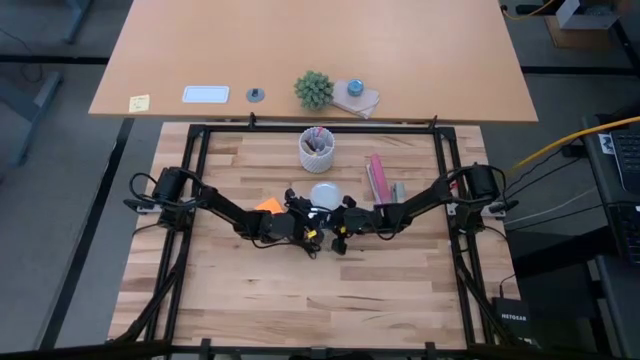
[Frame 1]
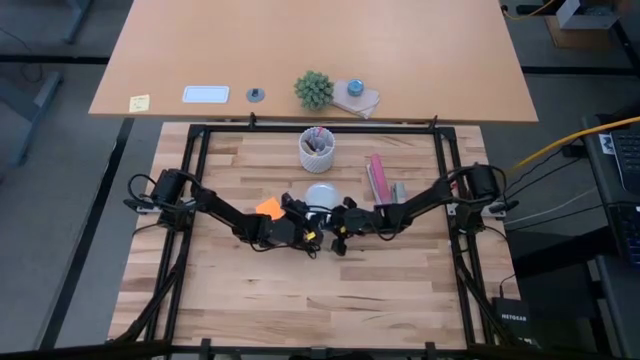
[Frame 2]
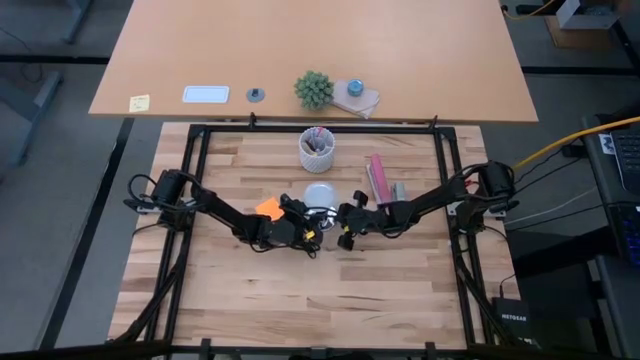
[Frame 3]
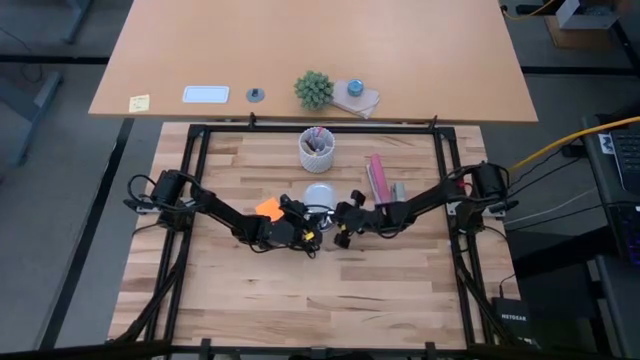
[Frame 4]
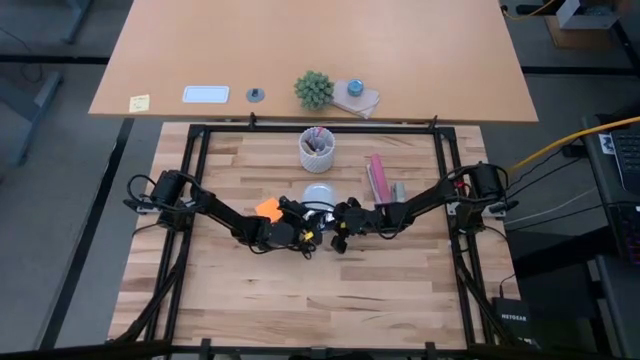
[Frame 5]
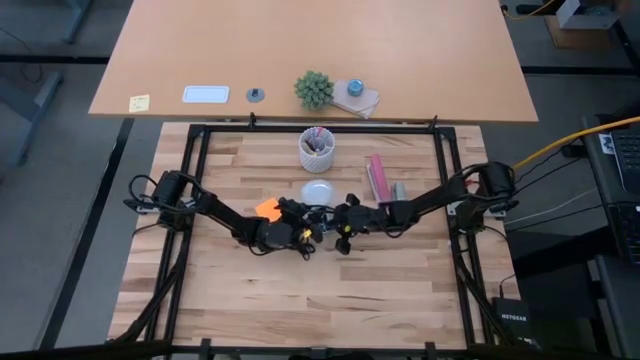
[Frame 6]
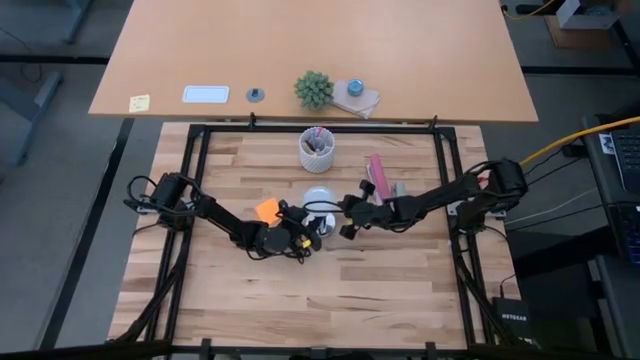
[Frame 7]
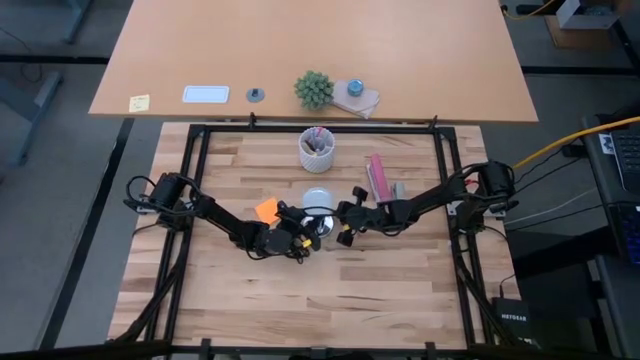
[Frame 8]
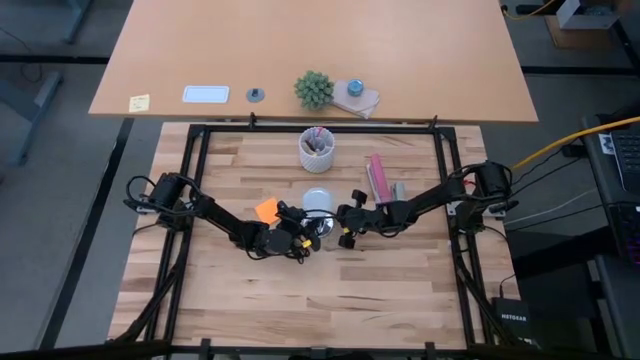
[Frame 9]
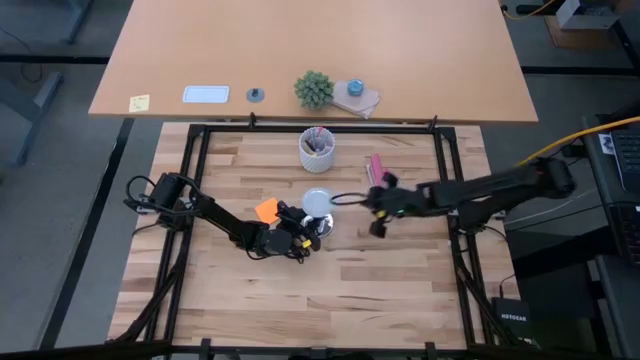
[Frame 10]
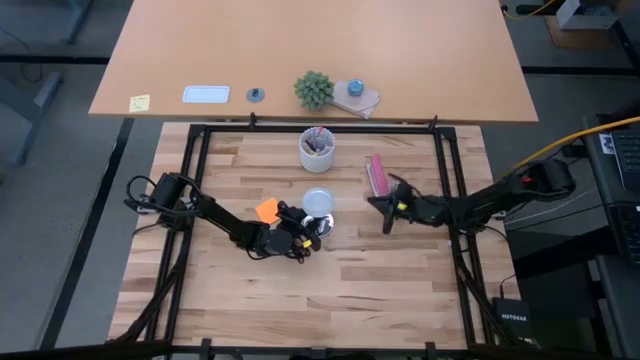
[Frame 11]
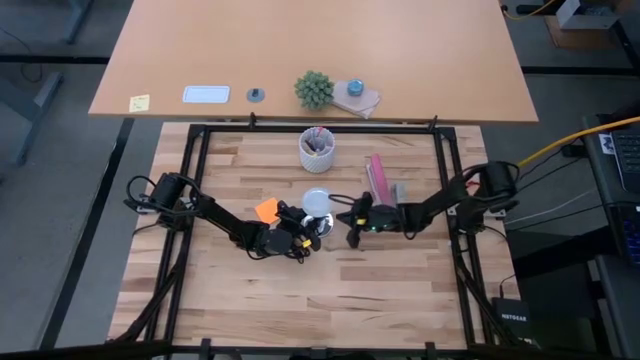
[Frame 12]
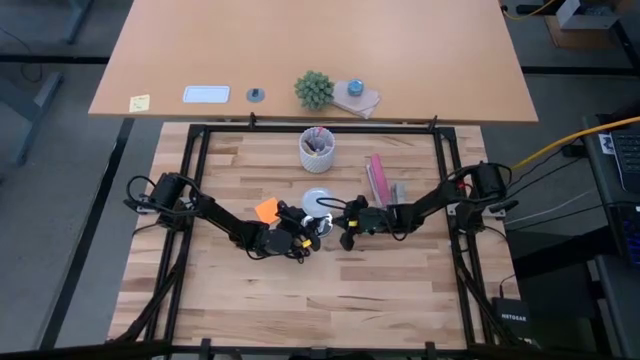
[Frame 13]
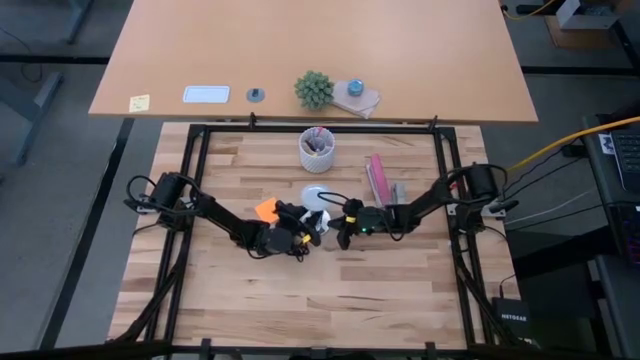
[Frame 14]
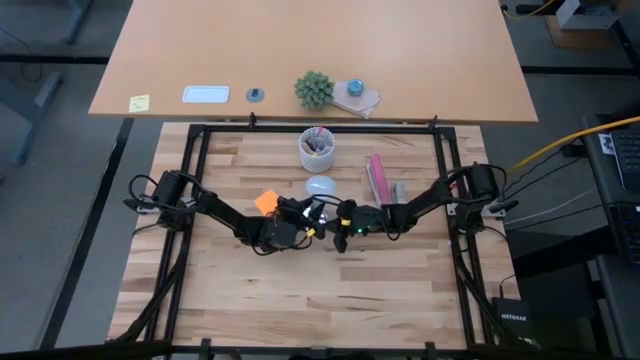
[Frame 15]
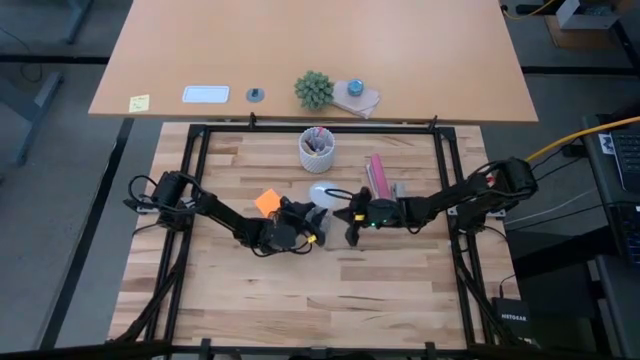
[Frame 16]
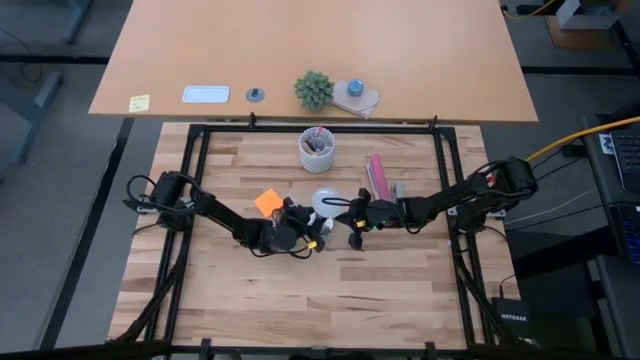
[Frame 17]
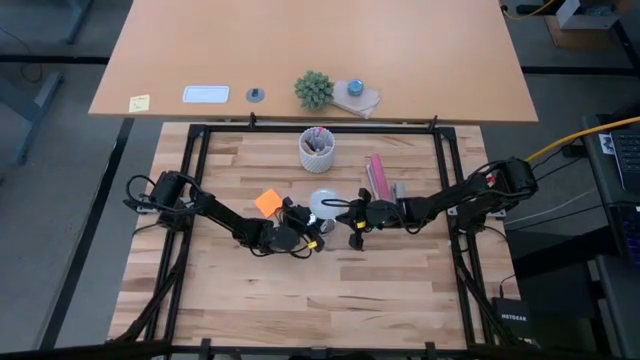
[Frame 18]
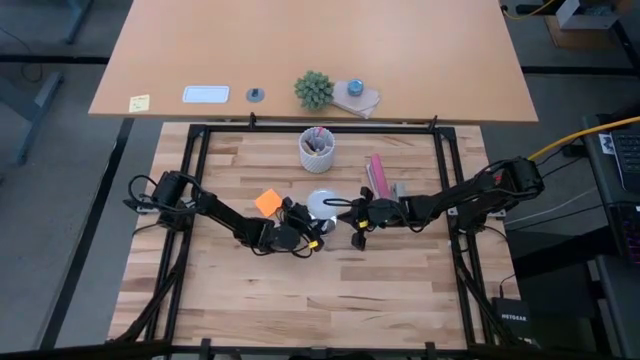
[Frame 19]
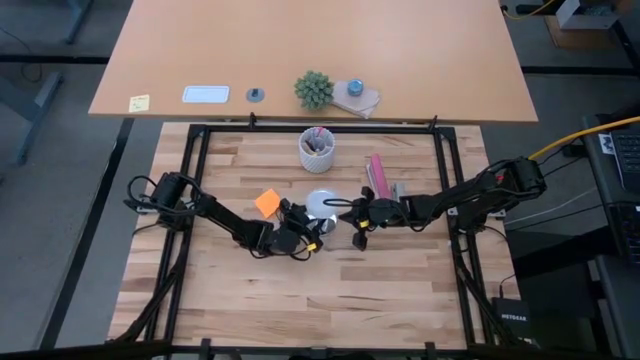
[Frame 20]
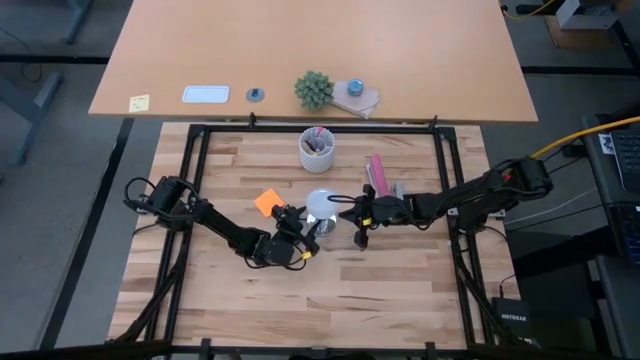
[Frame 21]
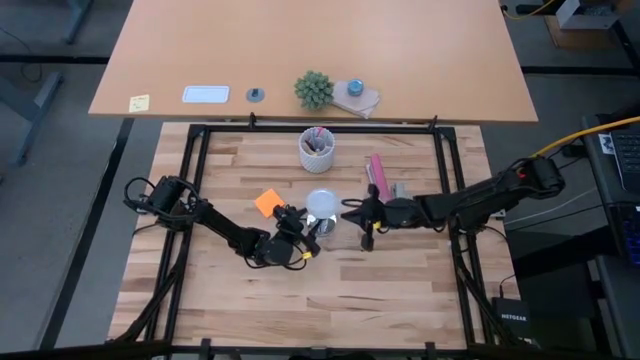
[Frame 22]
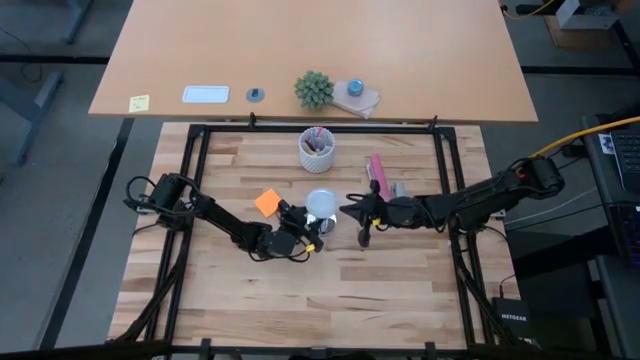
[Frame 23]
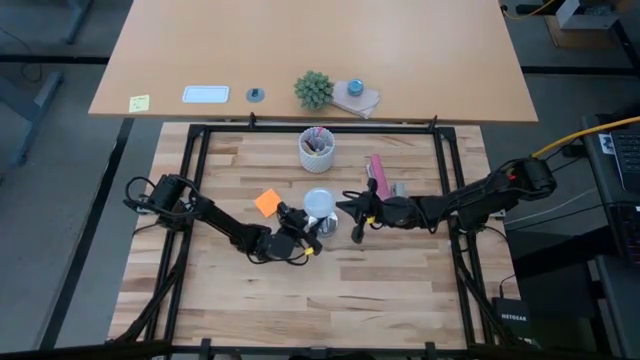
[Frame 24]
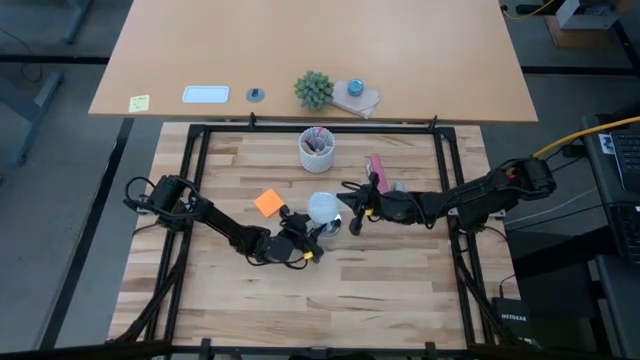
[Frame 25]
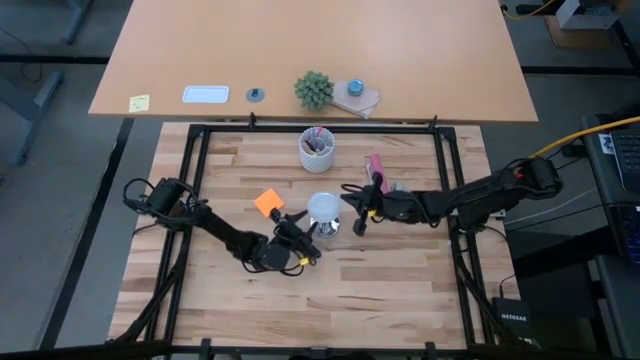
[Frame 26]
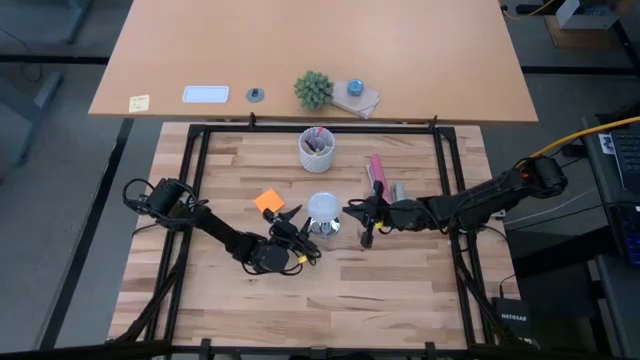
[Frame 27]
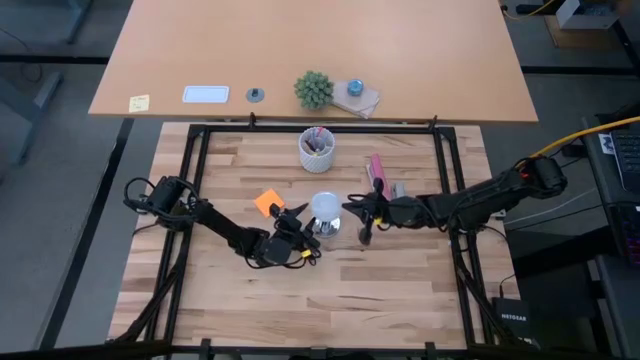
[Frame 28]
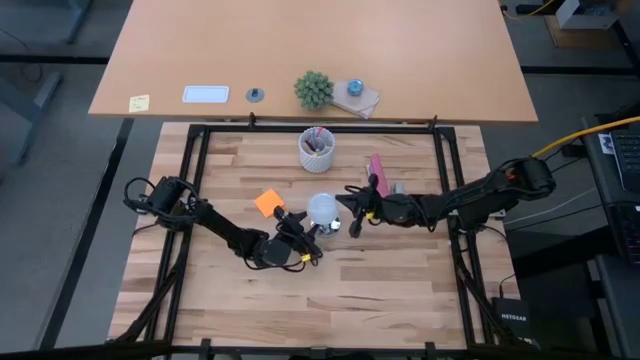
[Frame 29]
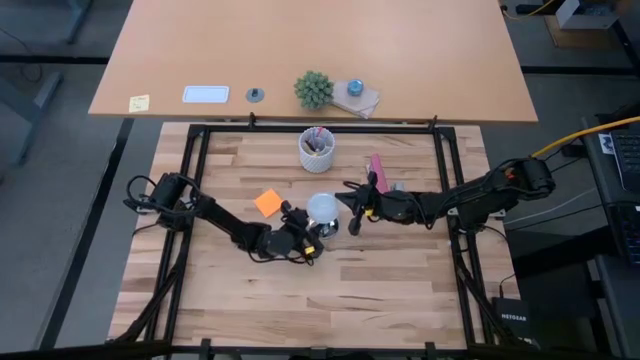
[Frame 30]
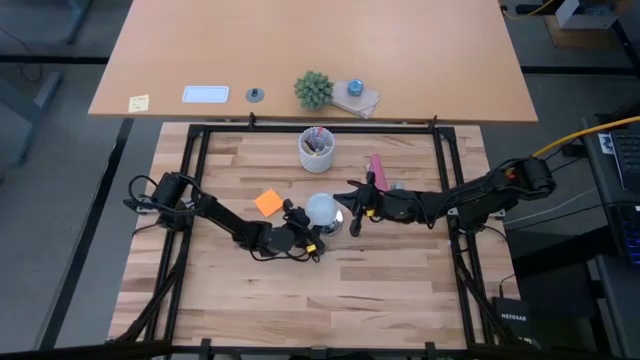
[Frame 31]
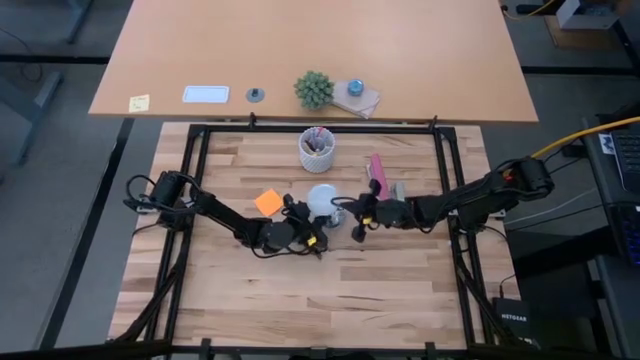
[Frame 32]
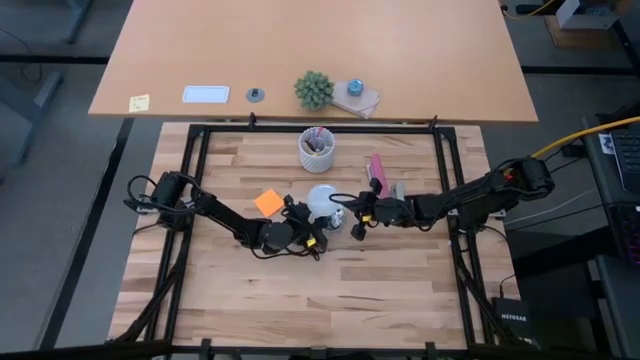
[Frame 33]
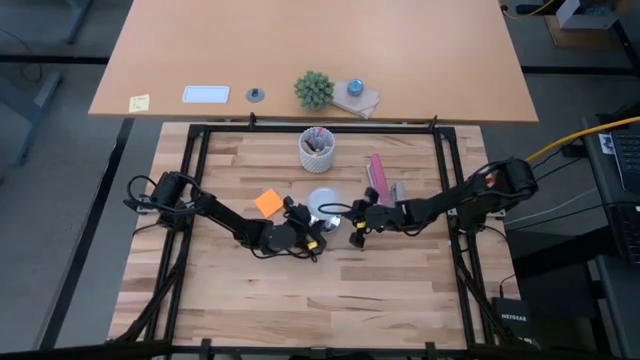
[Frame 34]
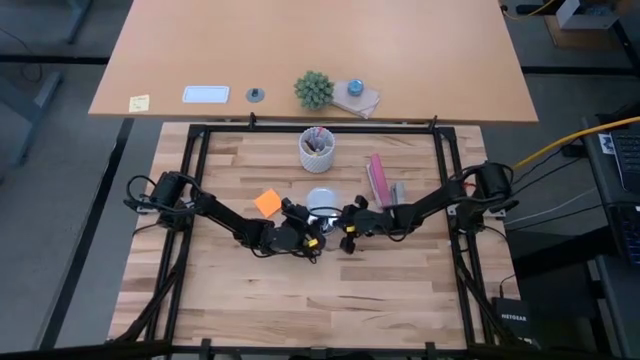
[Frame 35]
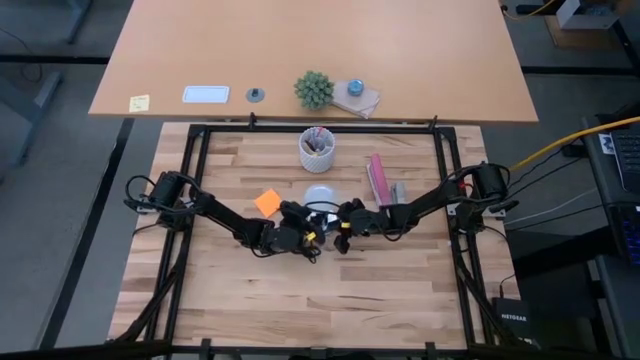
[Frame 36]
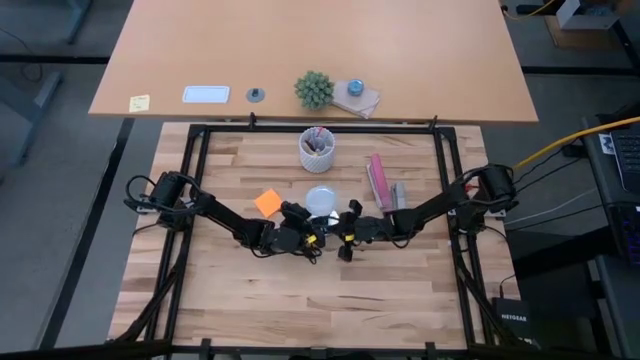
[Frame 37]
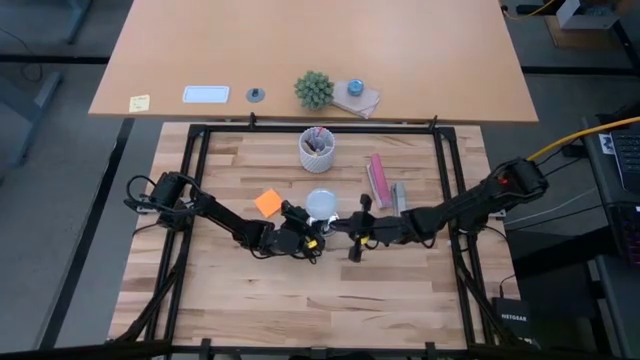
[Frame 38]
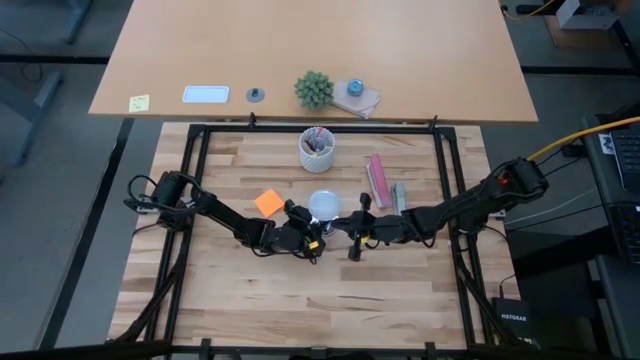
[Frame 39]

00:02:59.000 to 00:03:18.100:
Task: Screw lightbulb
Remove the lightbulb from the lamp
